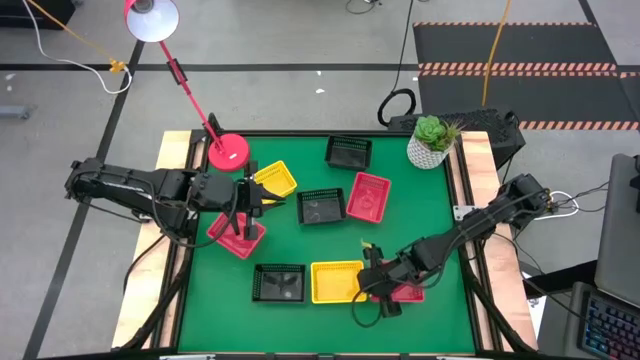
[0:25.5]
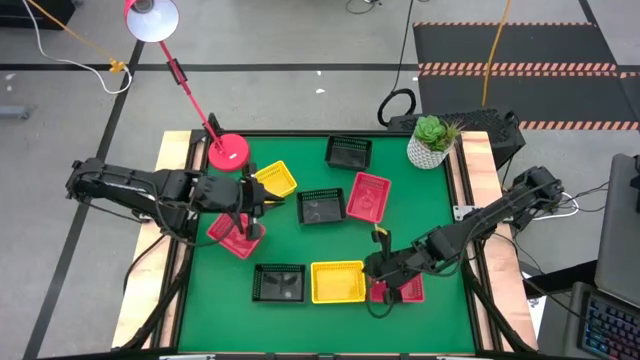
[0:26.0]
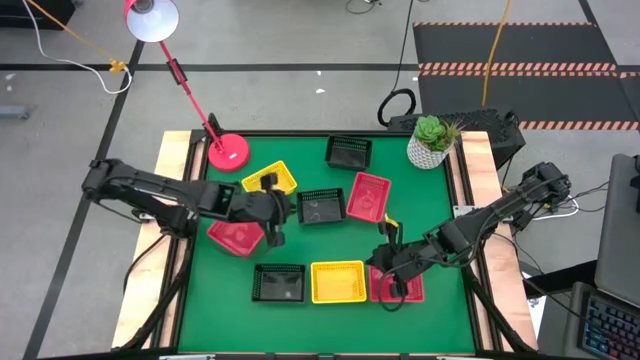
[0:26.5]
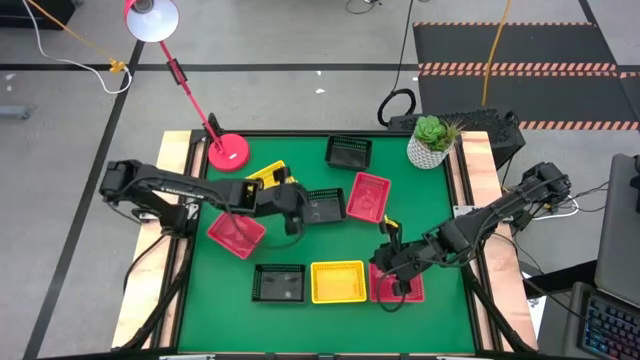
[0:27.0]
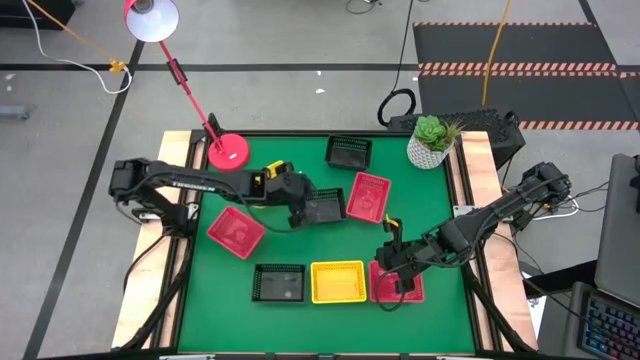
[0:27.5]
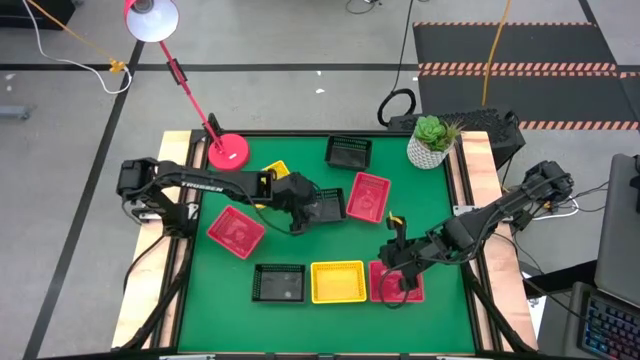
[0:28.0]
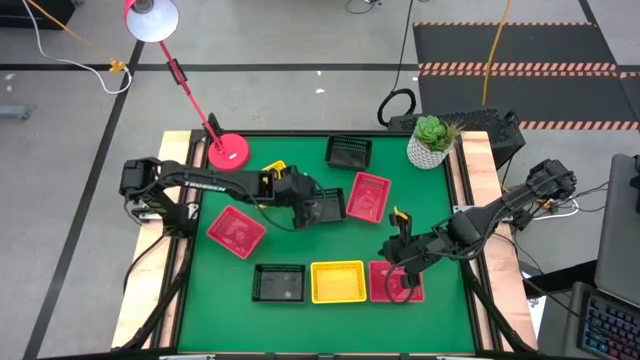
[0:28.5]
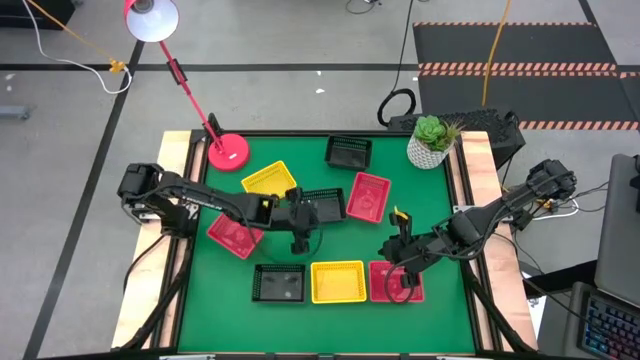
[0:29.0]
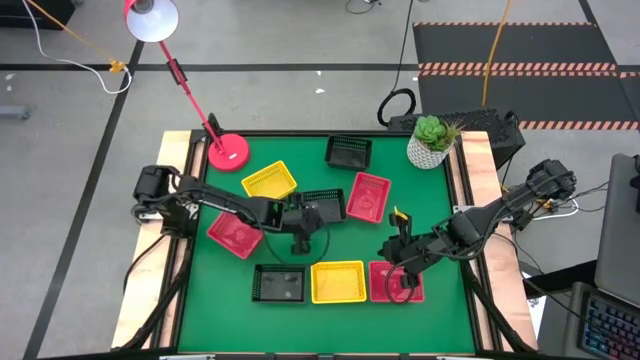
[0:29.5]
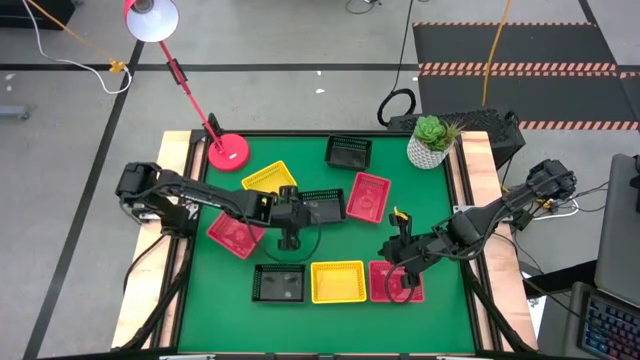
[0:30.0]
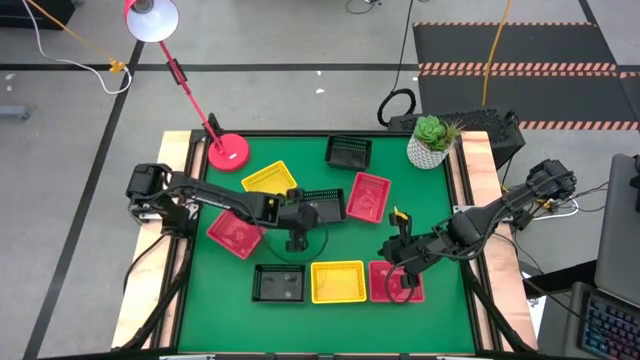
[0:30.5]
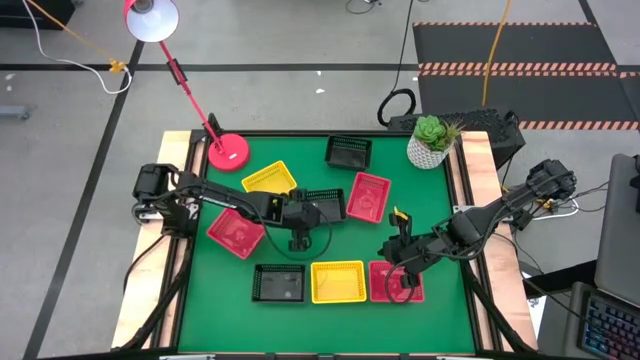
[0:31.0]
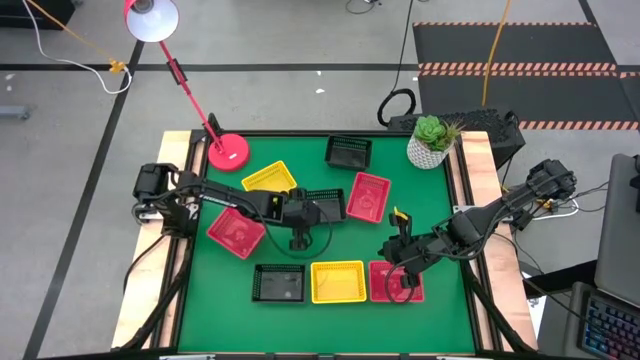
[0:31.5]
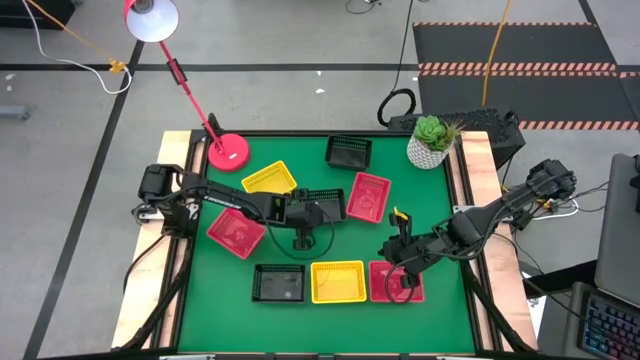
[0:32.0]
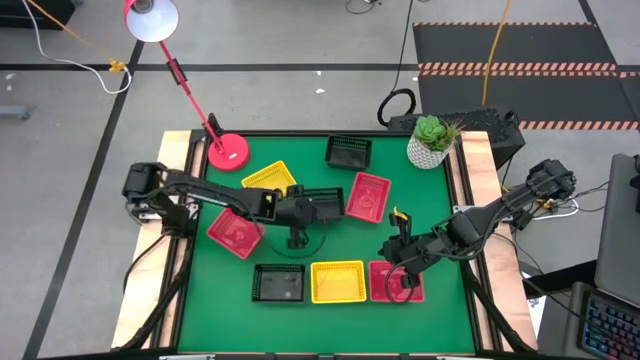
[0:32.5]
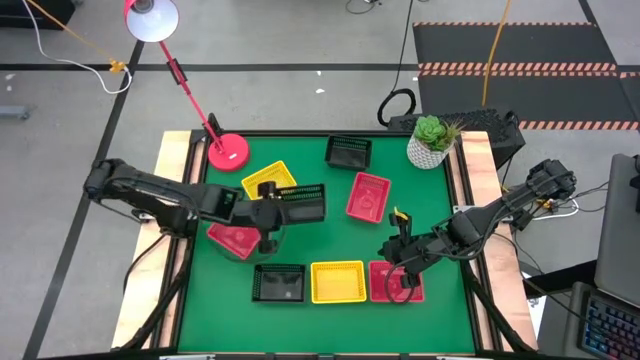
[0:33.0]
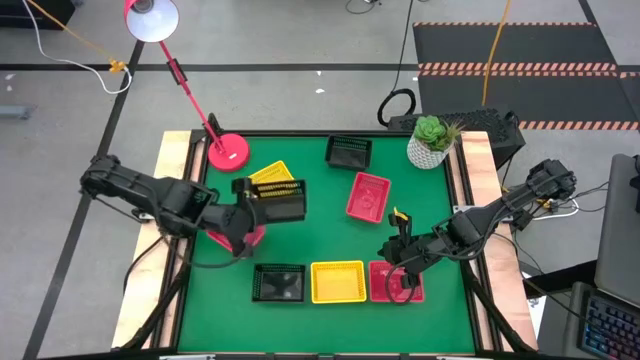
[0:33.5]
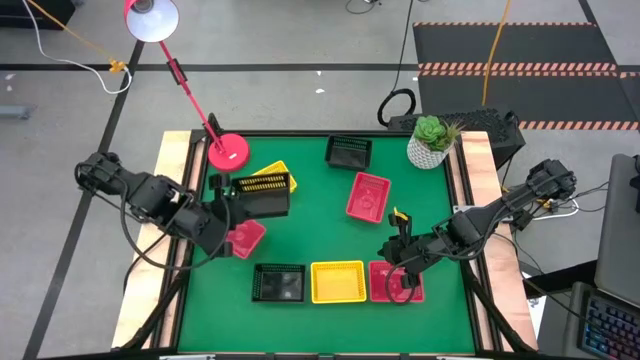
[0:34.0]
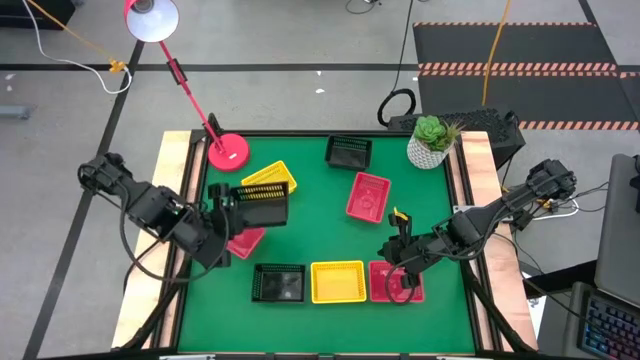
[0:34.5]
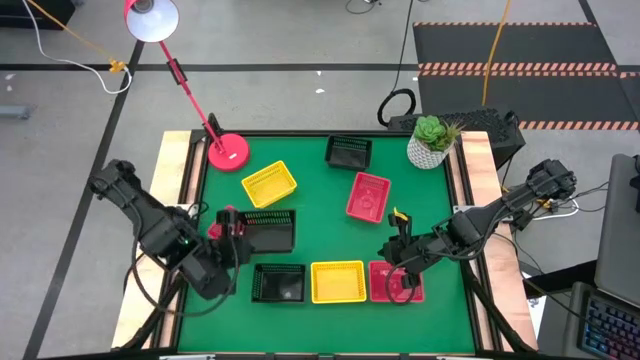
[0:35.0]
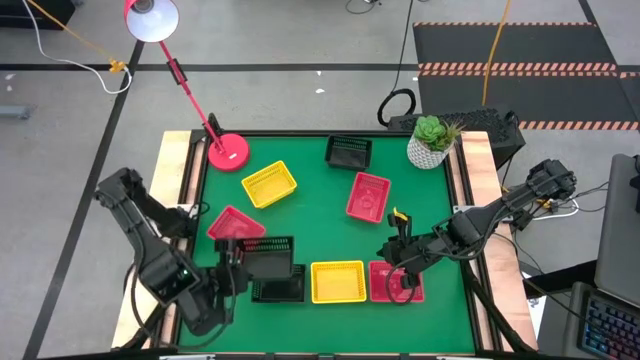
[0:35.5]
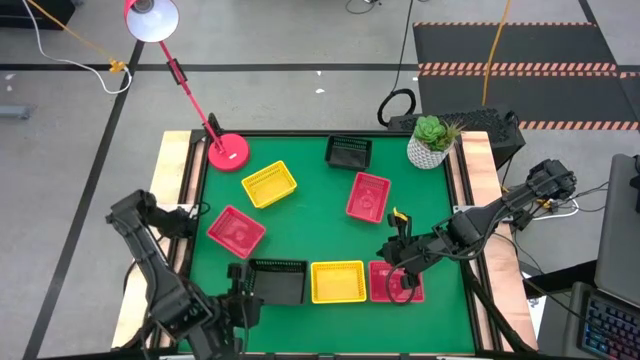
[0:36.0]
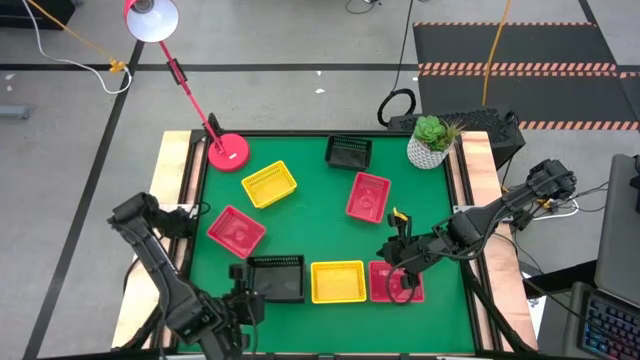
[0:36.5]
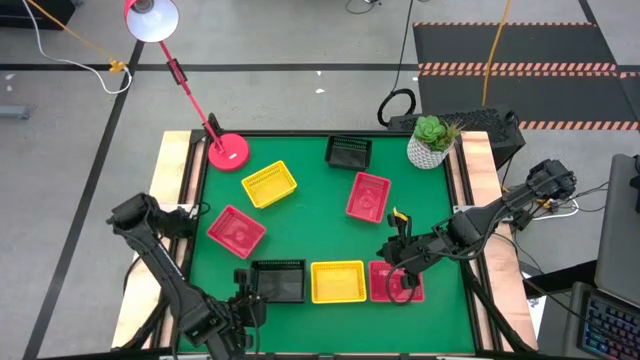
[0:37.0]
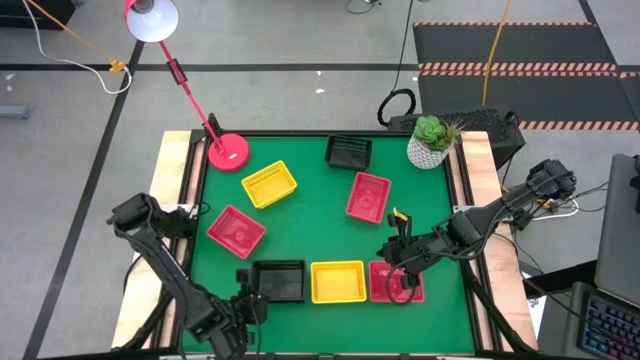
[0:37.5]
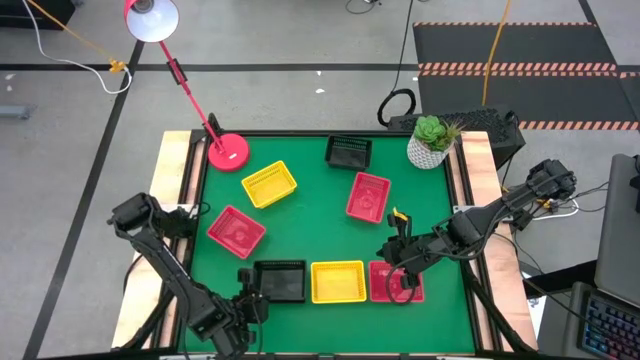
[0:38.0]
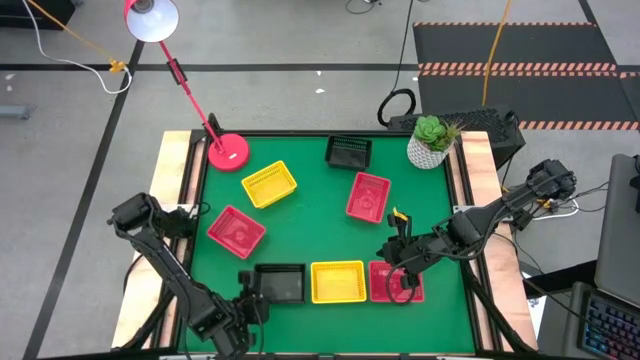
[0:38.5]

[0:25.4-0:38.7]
Stack the middle black bin on top of the bottom black bin

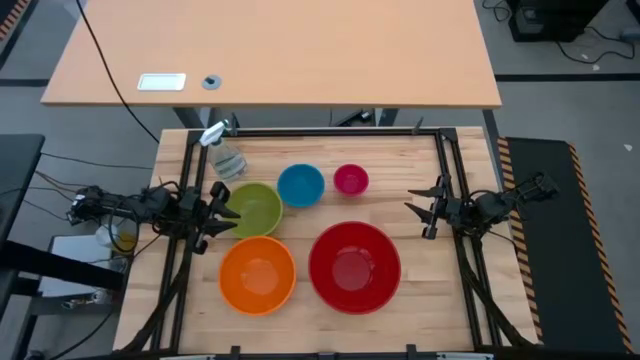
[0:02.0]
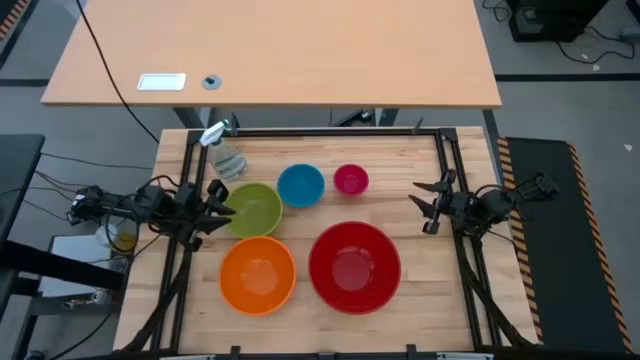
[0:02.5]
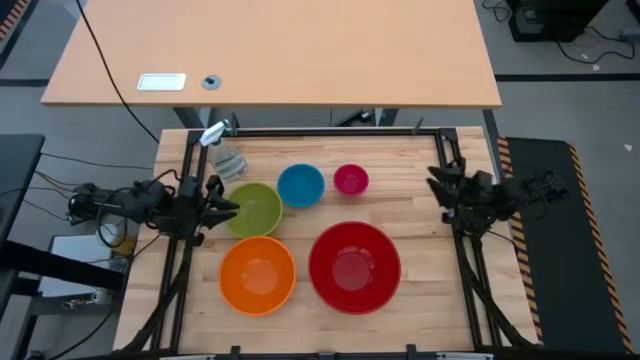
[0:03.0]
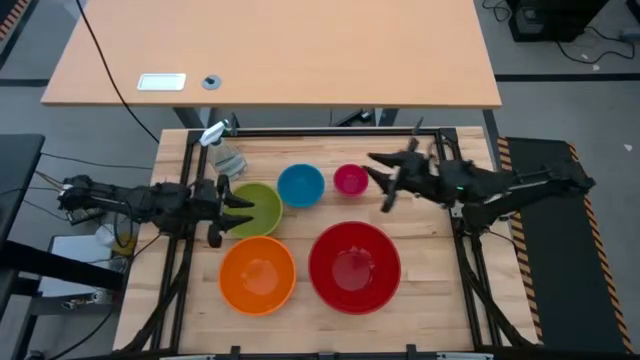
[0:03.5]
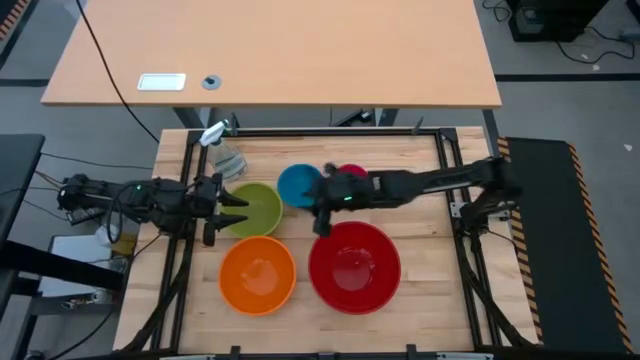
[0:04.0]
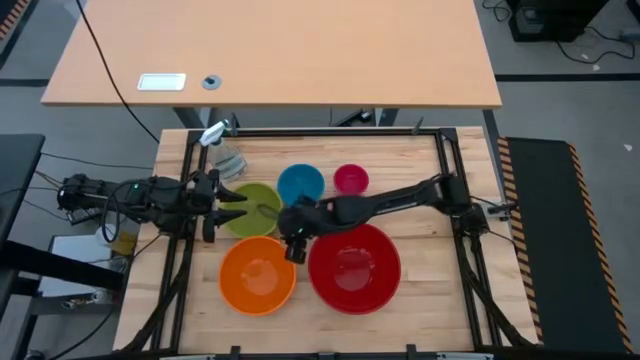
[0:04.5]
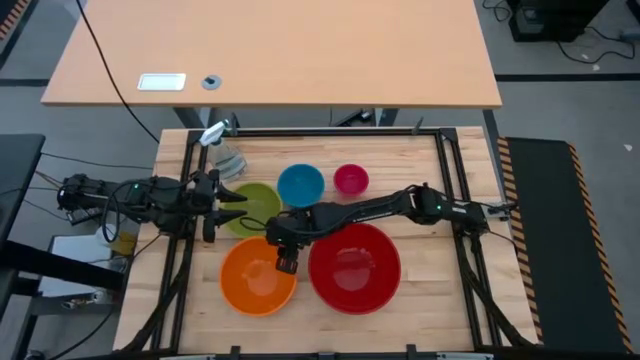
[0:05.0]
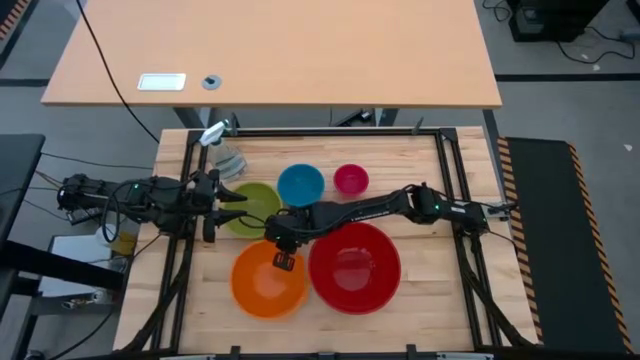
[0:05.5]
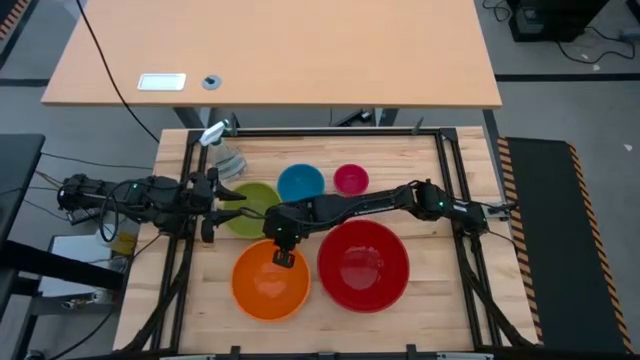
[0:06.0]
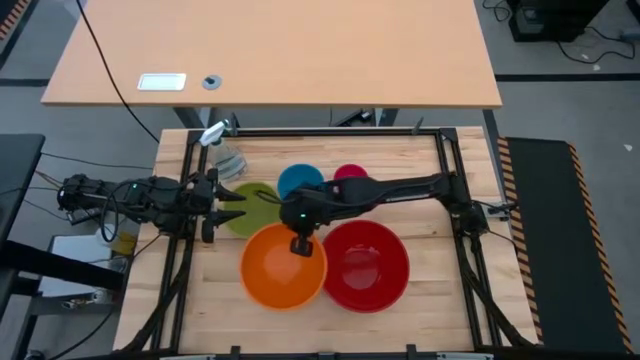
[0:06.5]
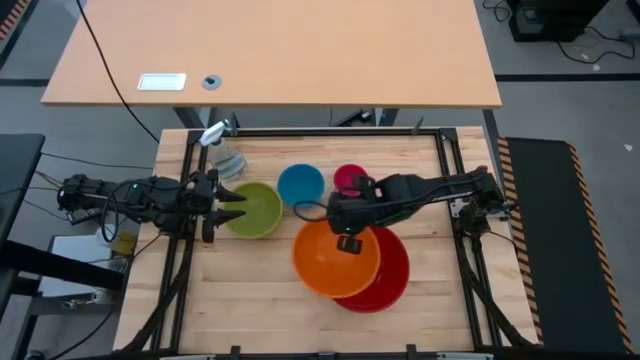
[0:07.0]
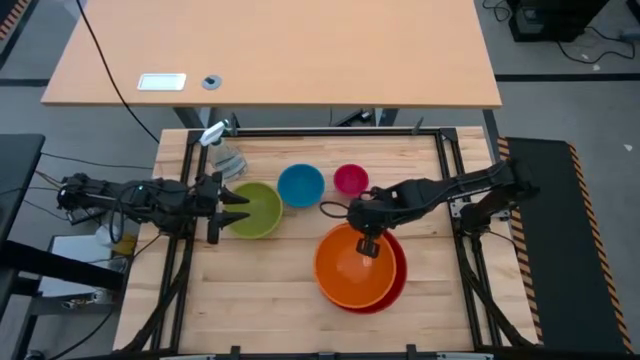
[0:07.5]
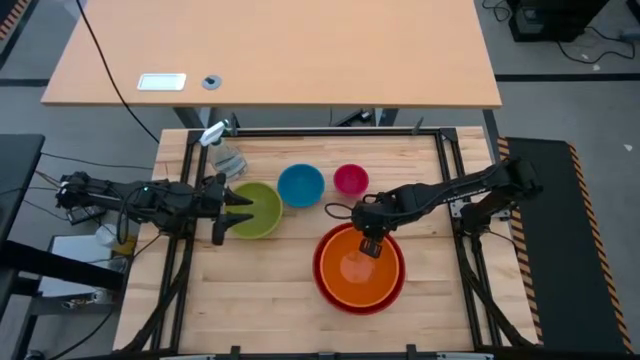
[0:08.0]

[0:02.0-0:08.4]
Stack the orange bowl on top of the red bowl

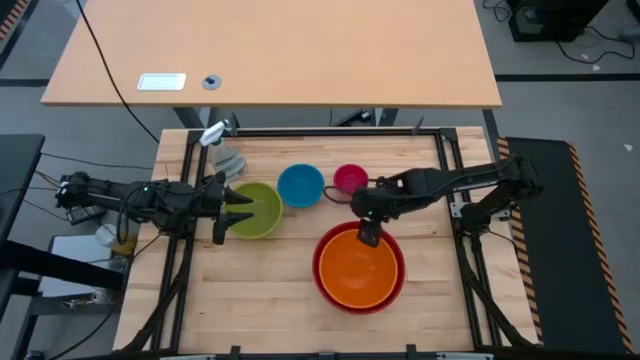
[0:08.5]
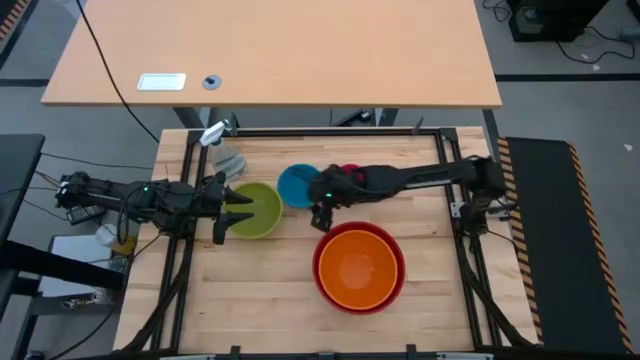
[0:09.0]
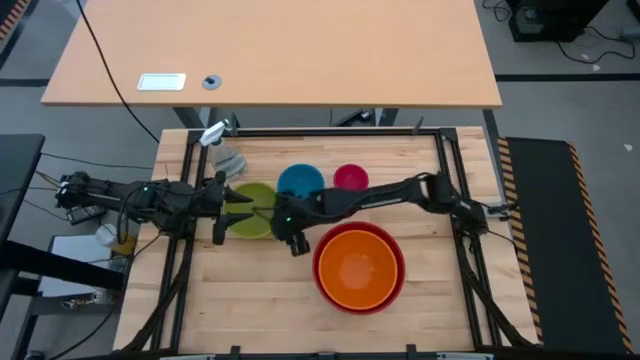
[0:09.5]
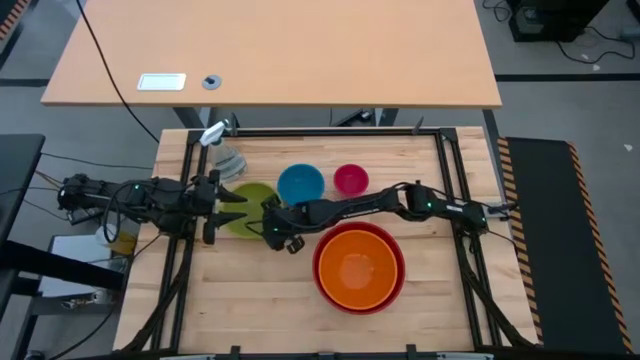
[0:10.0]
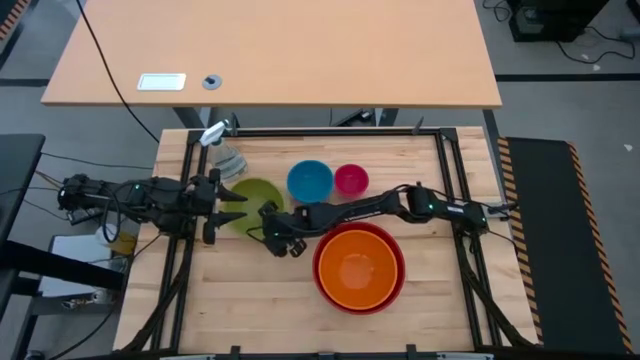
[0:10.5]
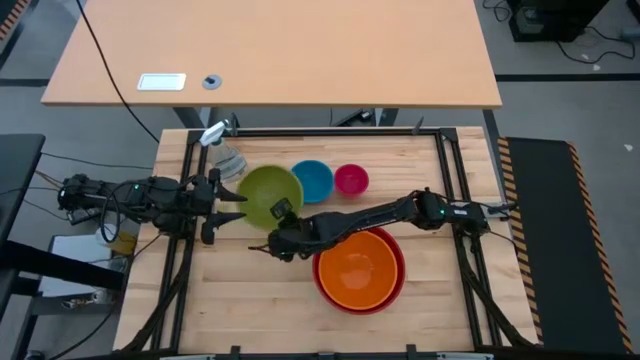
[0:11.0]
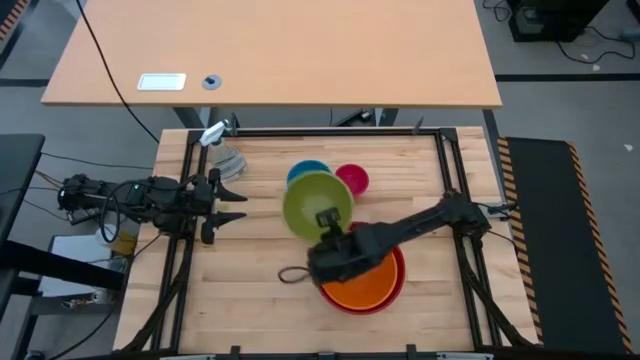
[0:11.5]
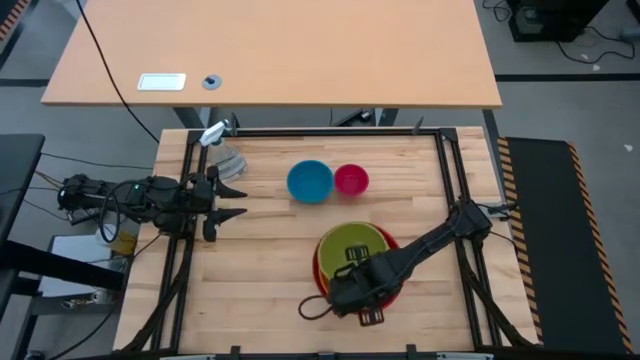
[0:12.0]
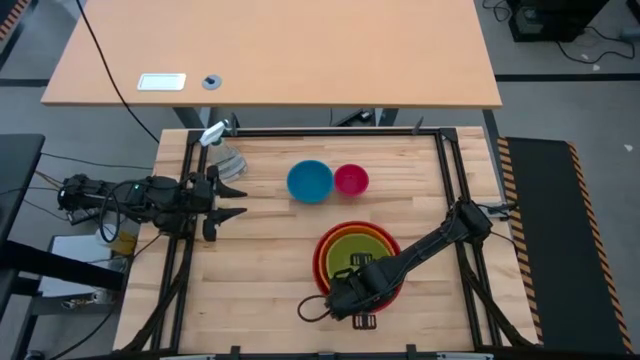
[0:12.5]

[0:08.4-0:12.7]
Stack the green bowl on top of the orange bowl
